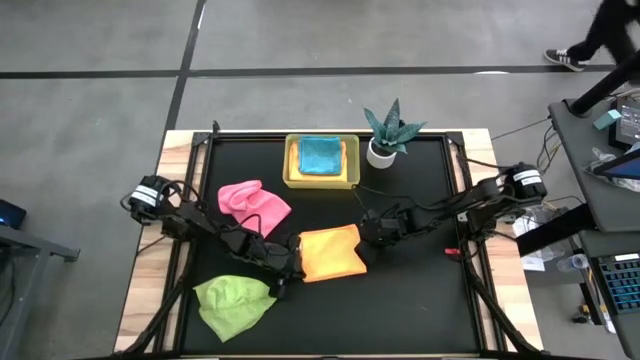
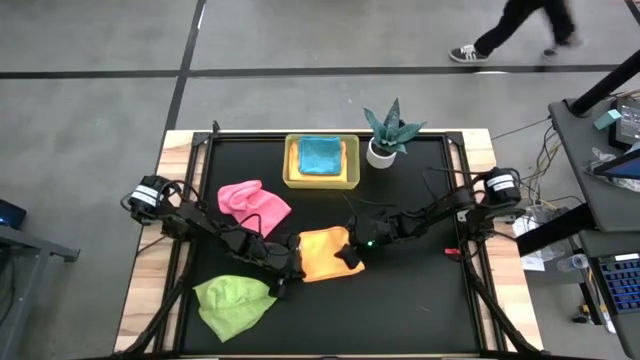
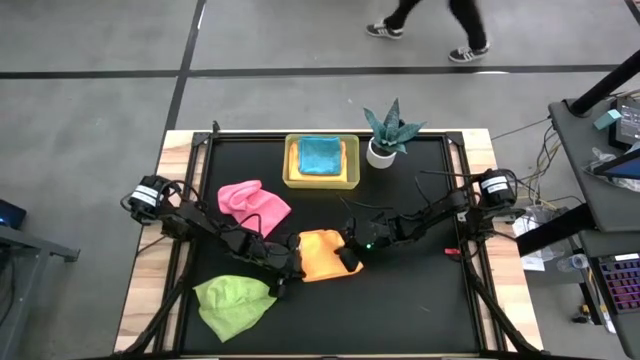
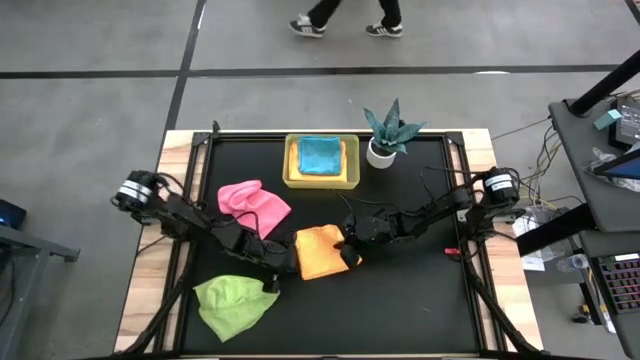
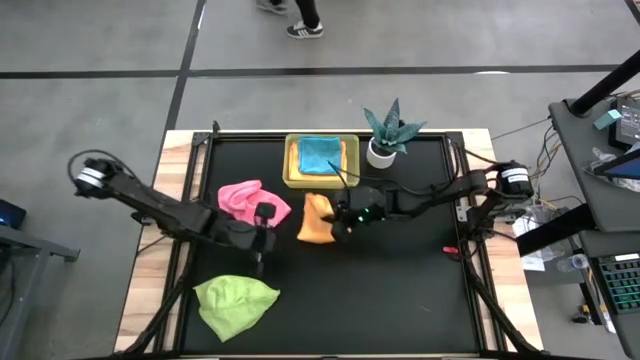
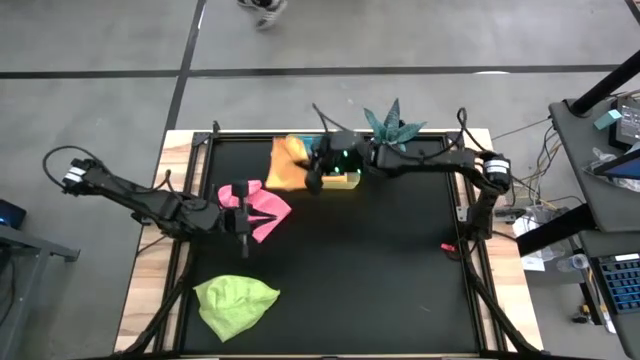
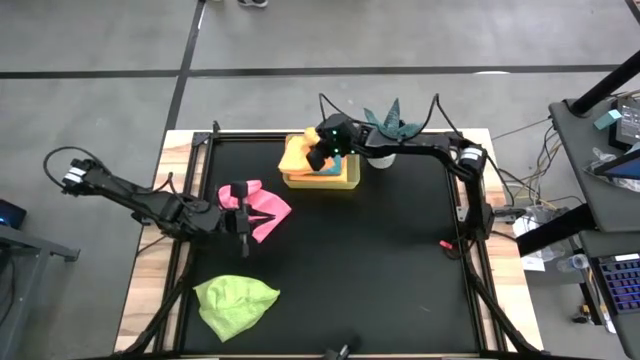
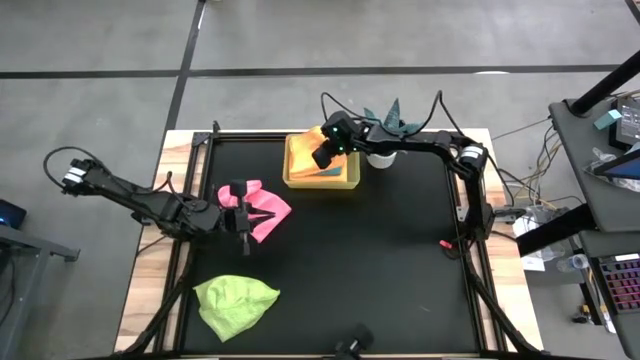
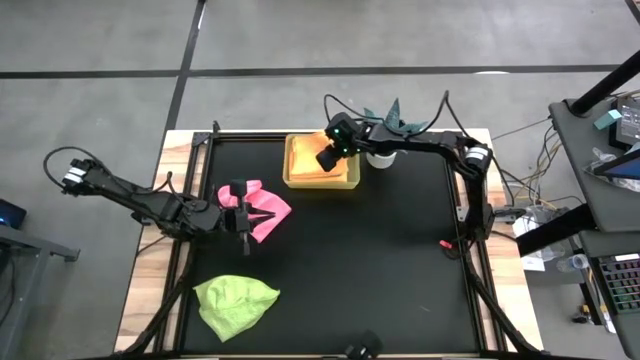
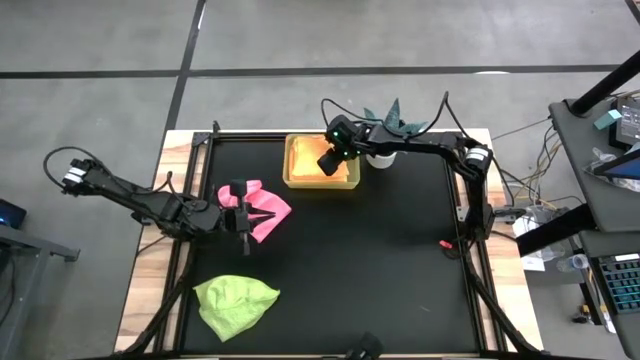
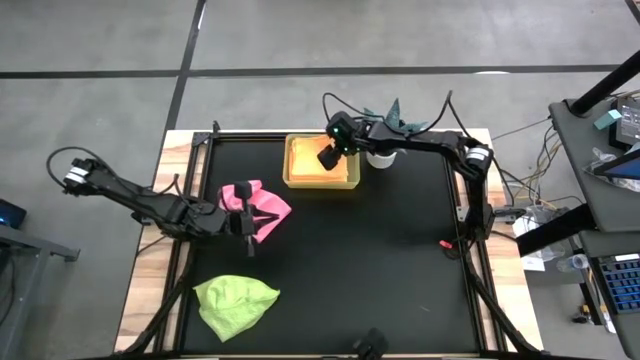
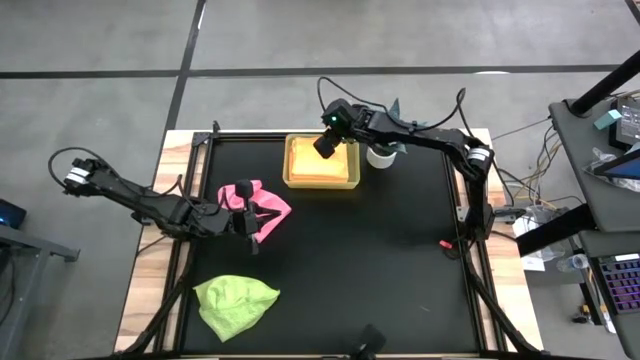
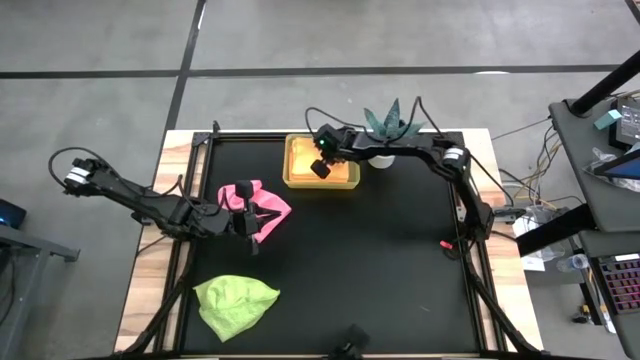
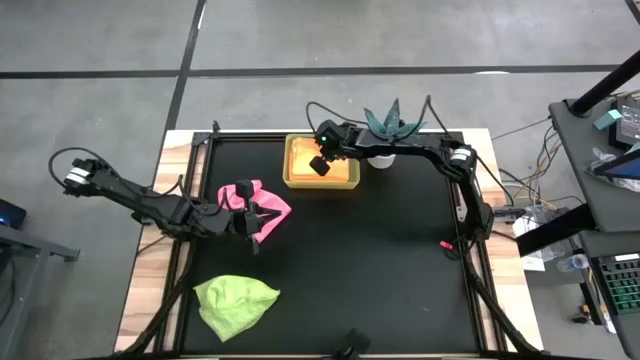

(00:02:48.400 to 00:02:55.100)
Task: Fold microfiber towels
Put the orange microfiber cloth into the yellow bin

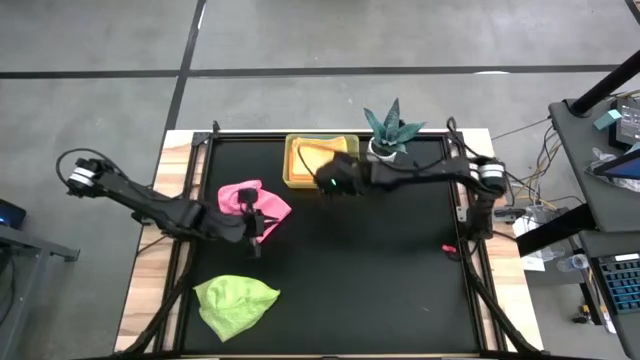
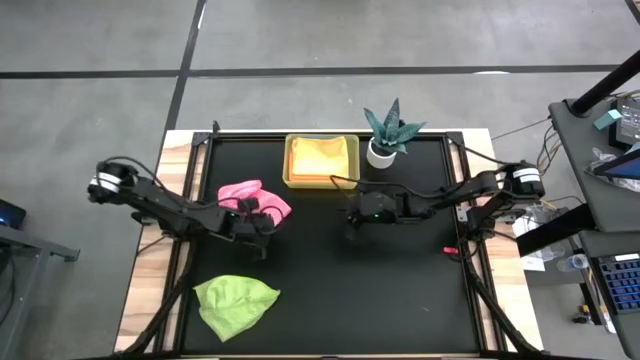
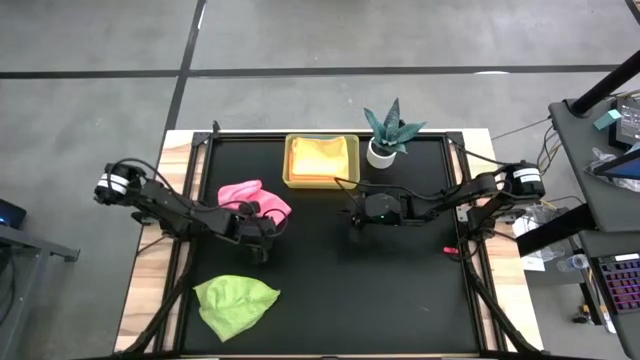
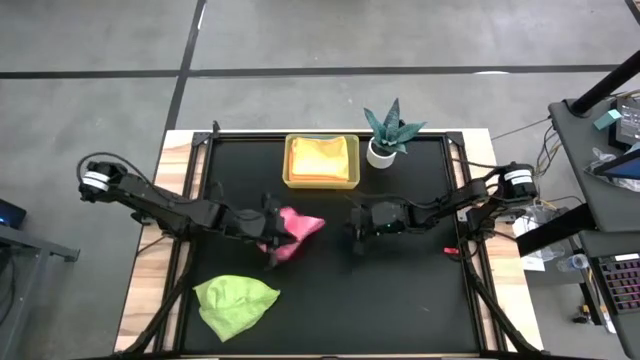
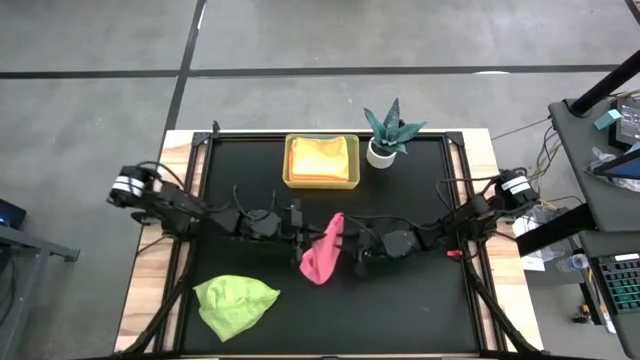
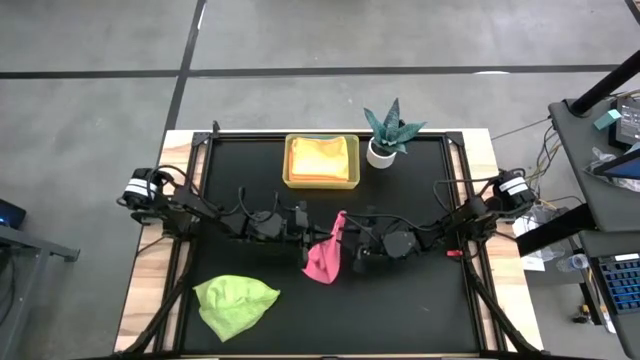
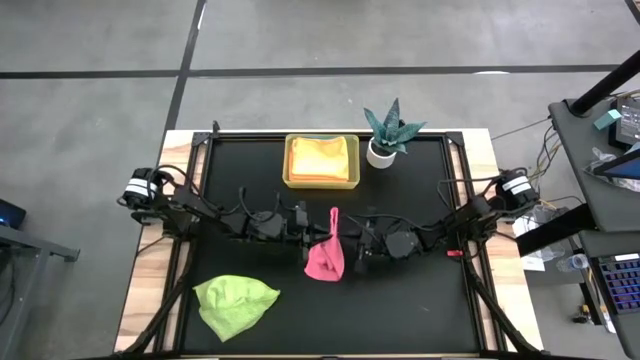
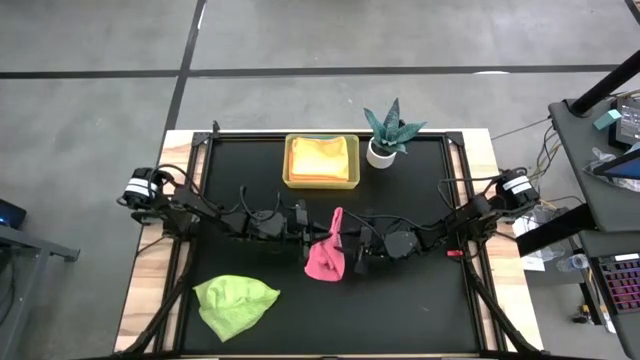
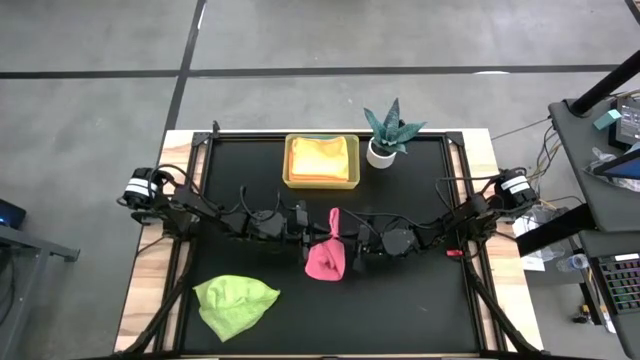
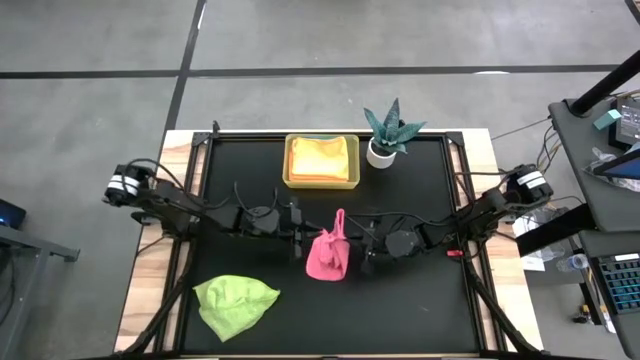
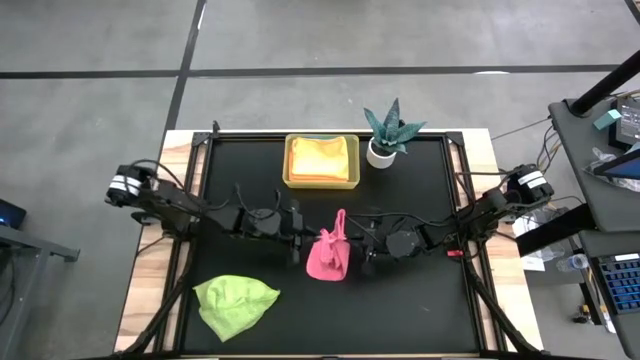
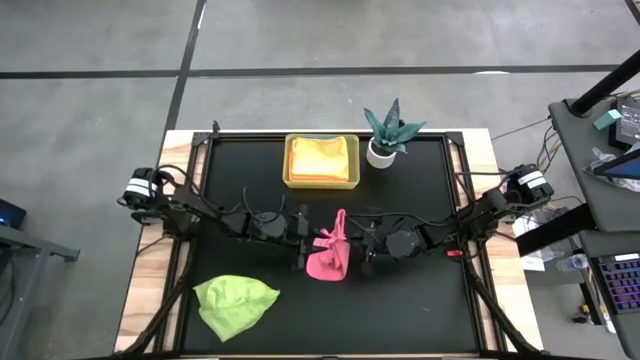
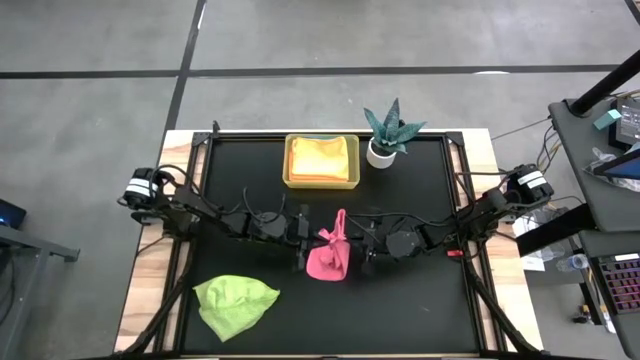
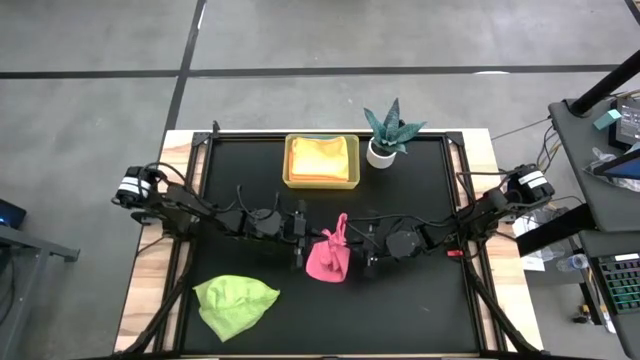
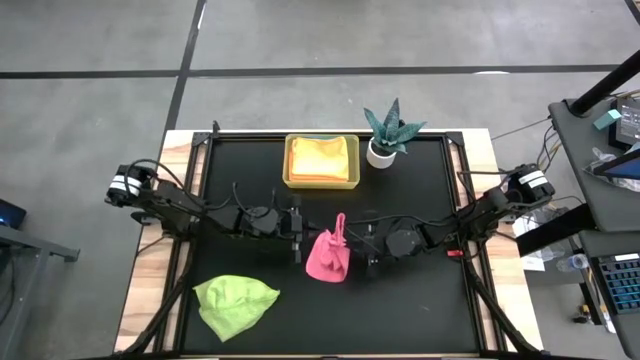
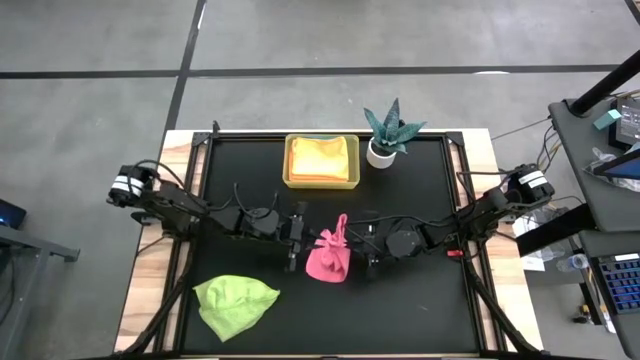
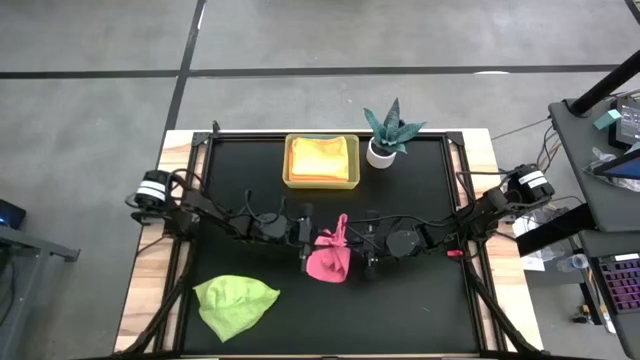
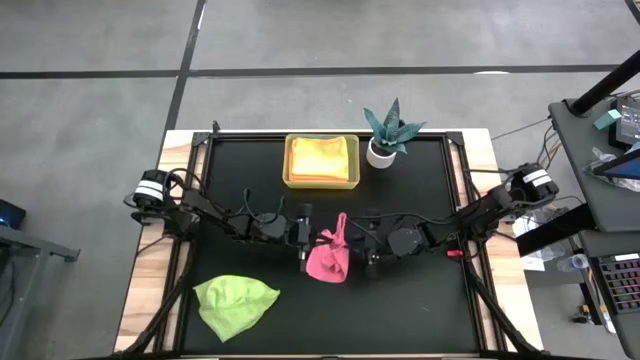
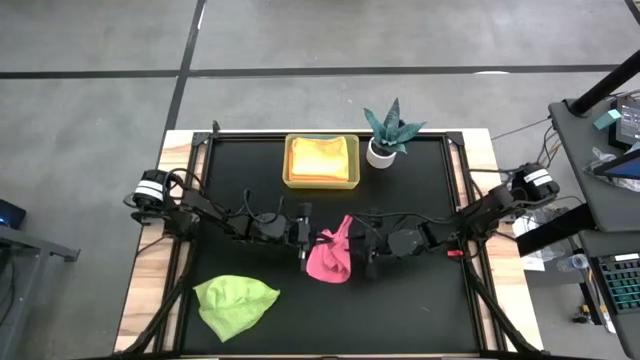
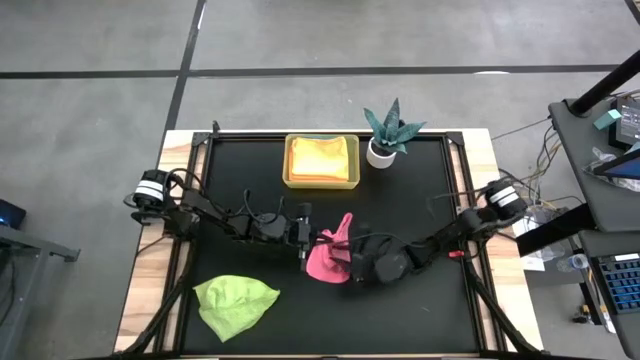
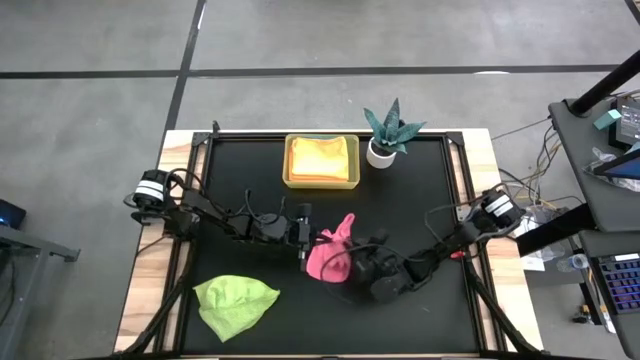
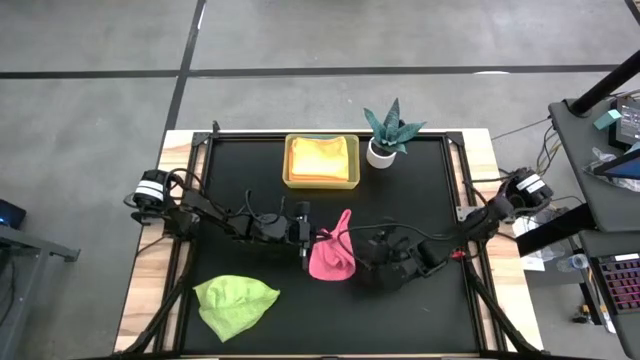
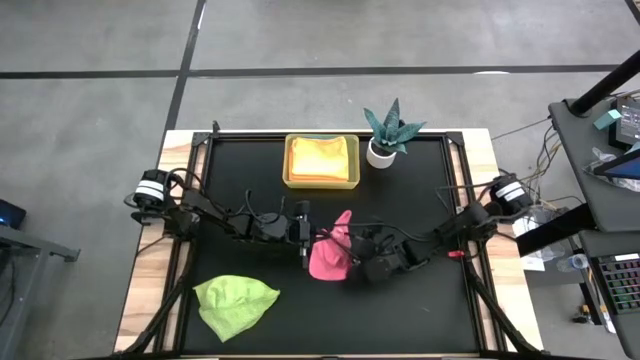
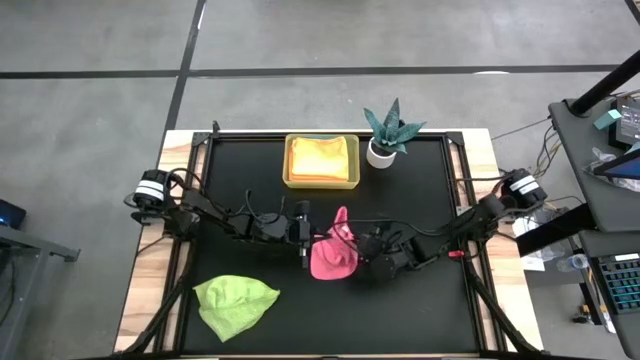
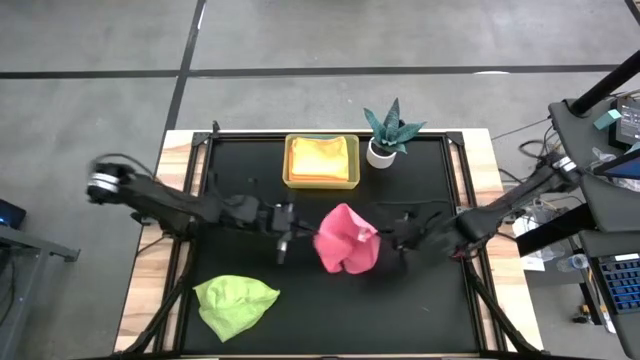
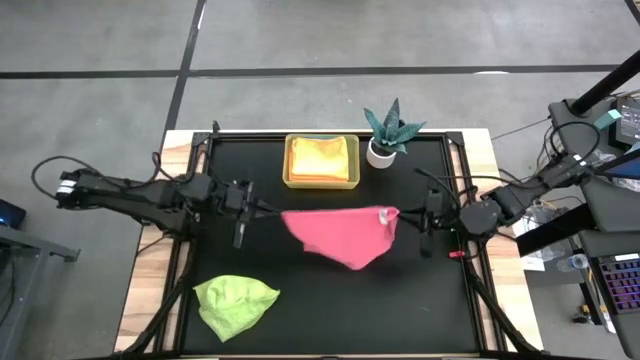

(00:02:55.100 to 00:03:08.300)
Fold the pink microfiber cloth

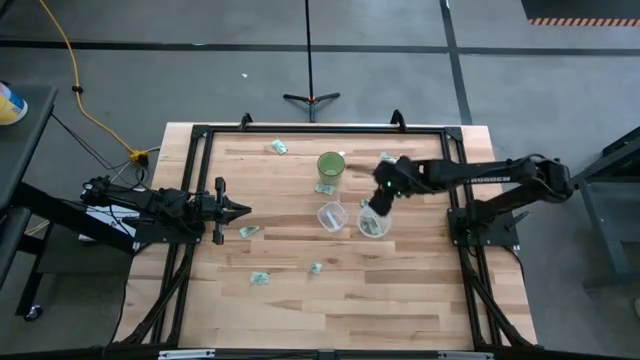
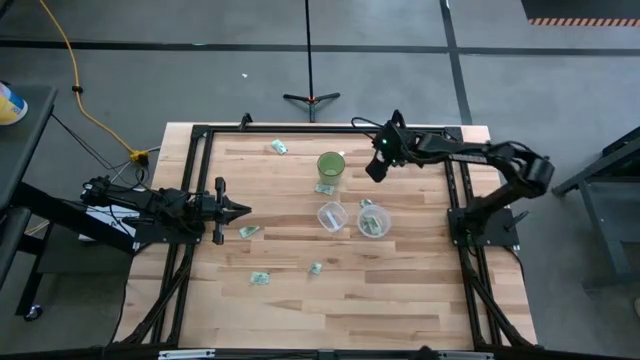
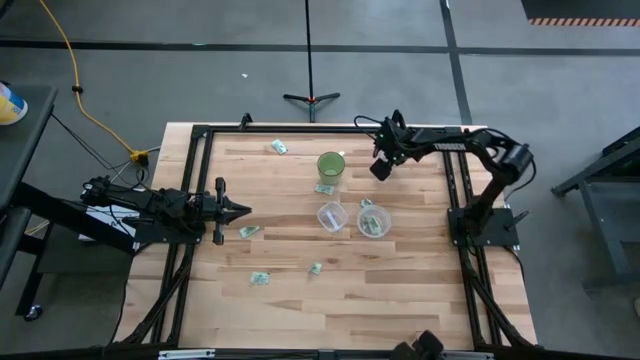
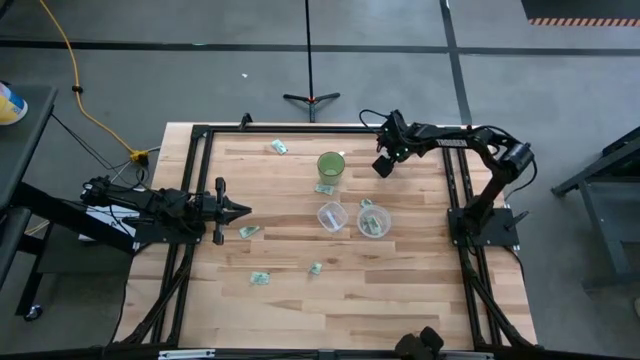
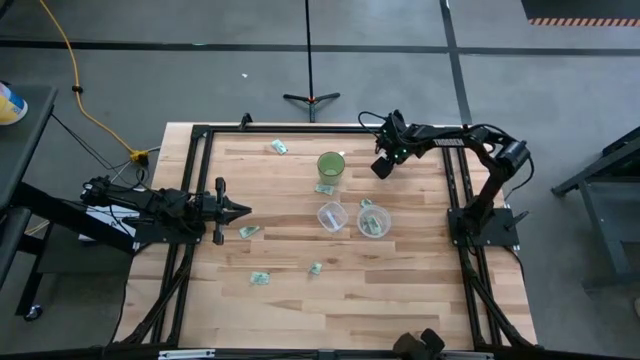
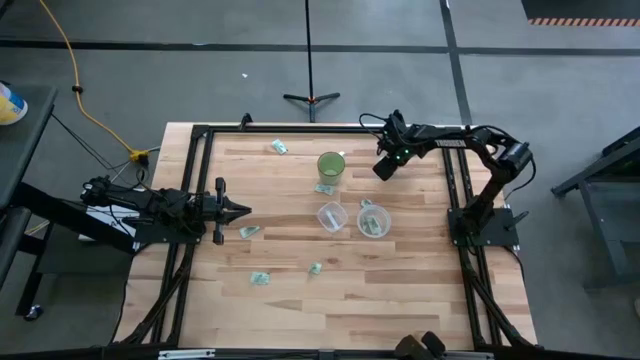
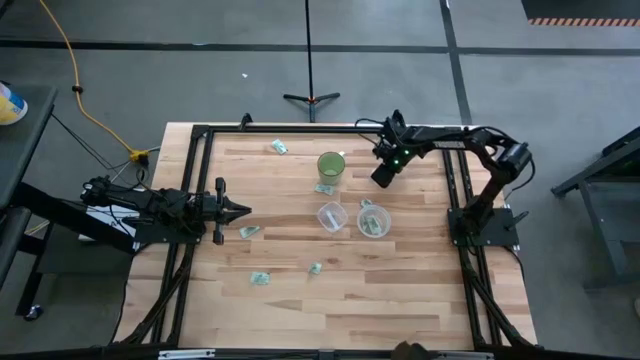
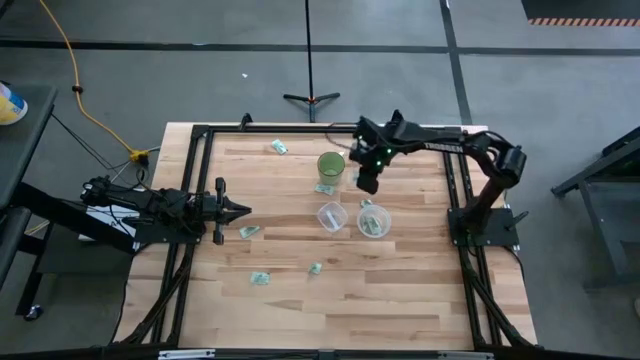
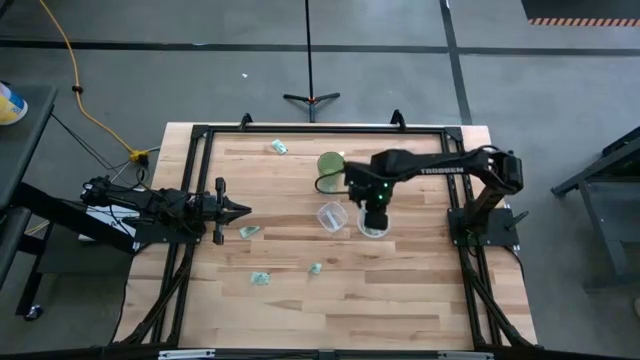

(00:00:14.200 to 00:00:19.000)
Task: Pick and place items into bin
Put the stevia packet into the right transparent bin
